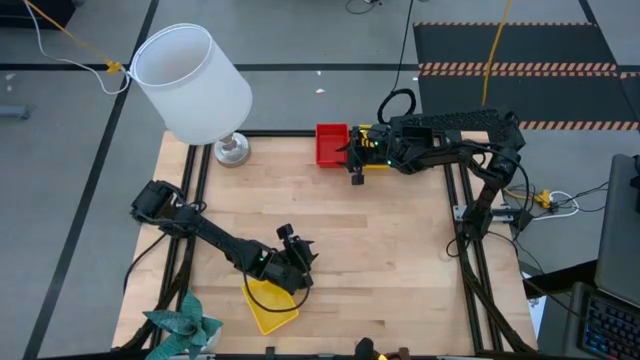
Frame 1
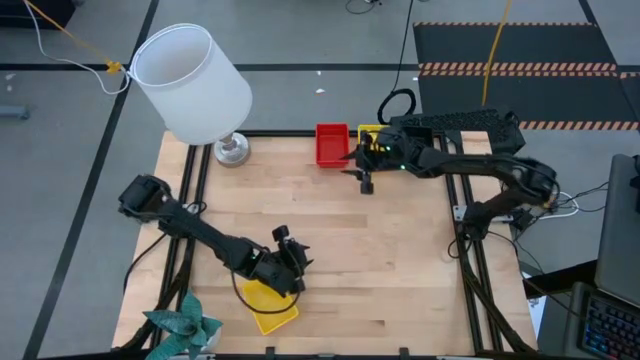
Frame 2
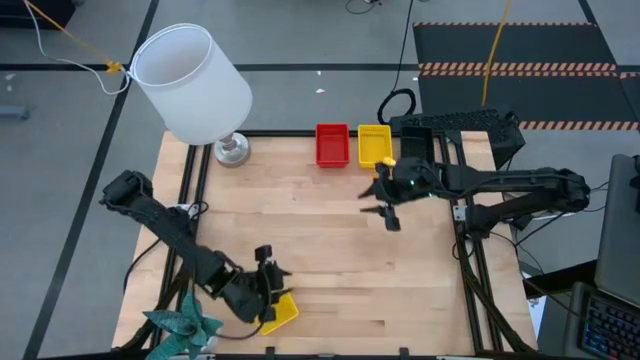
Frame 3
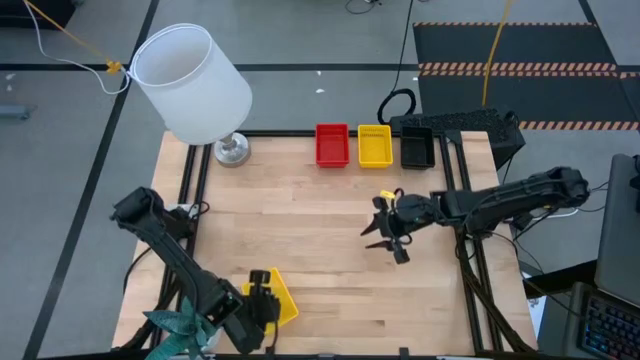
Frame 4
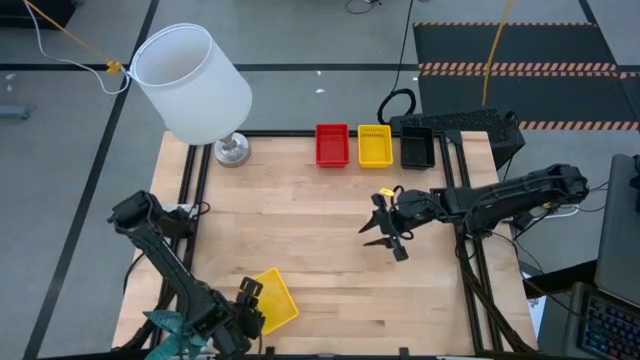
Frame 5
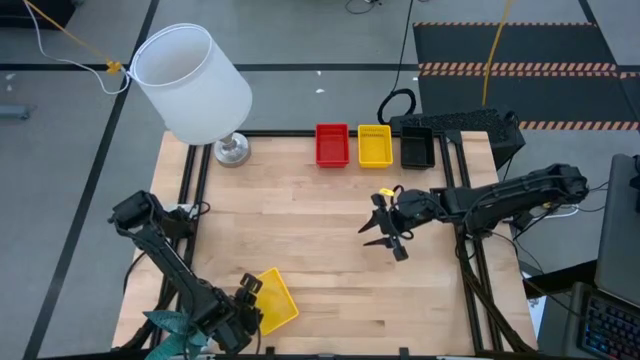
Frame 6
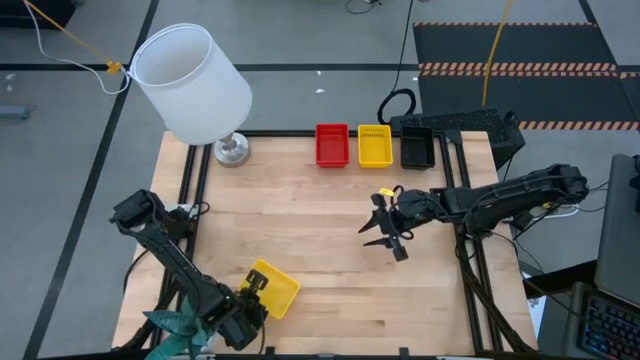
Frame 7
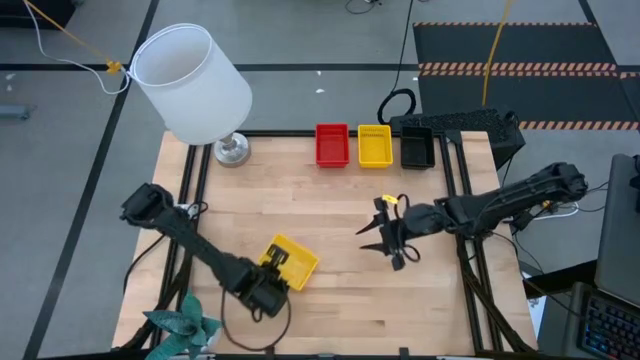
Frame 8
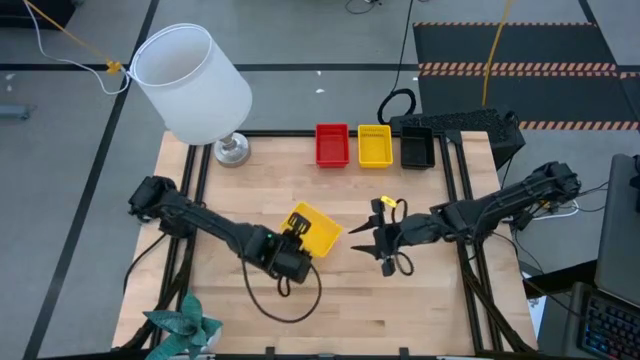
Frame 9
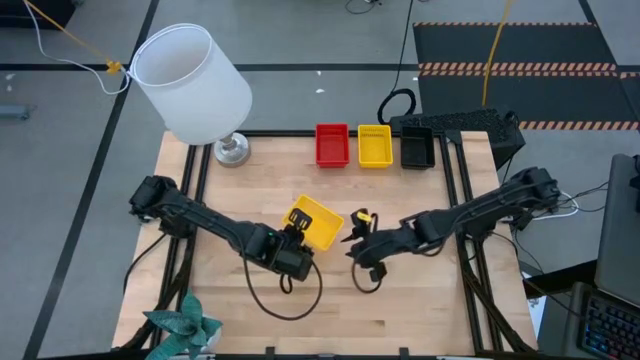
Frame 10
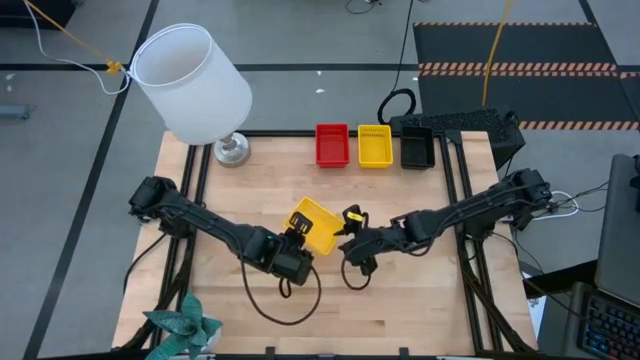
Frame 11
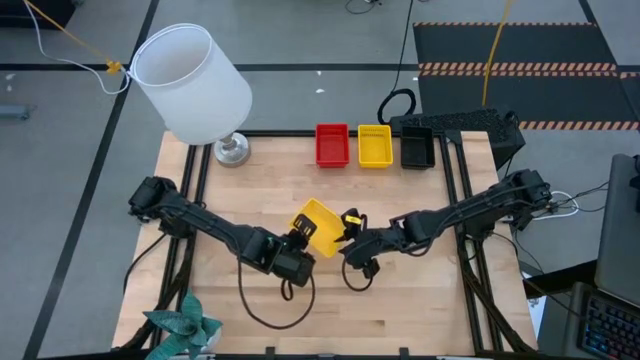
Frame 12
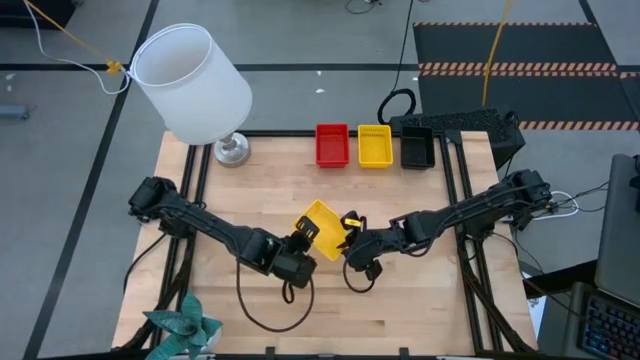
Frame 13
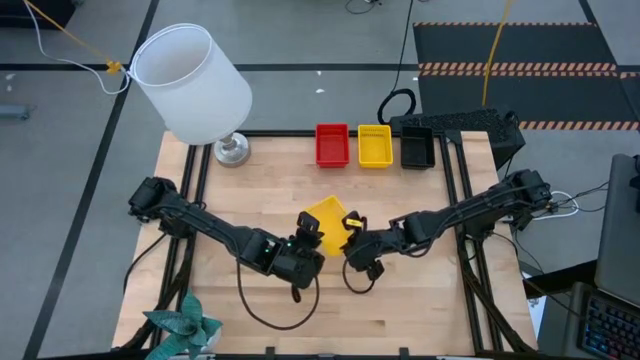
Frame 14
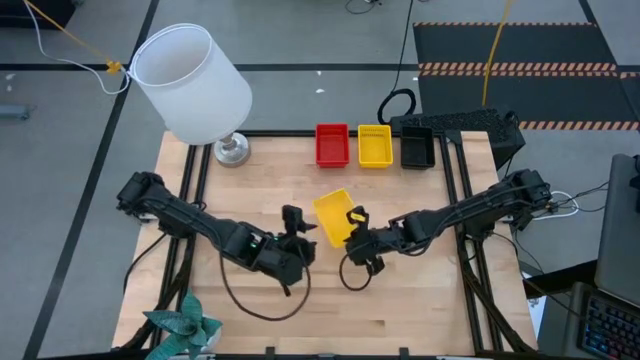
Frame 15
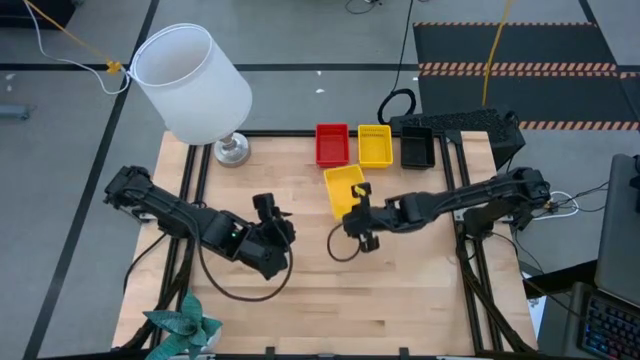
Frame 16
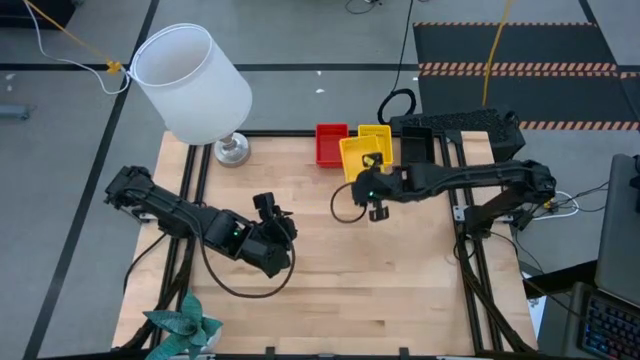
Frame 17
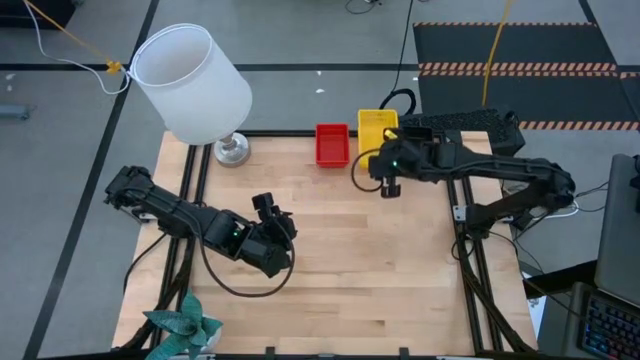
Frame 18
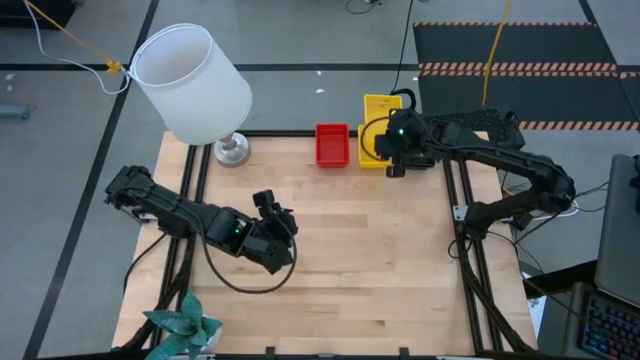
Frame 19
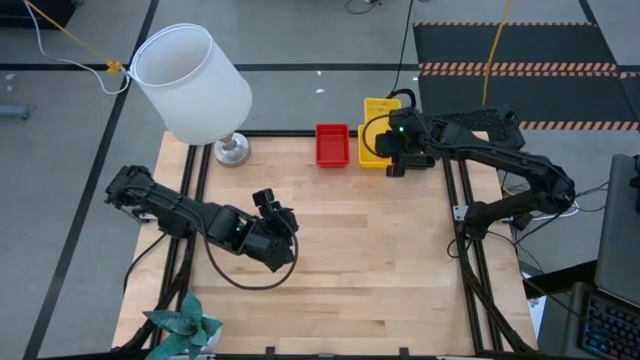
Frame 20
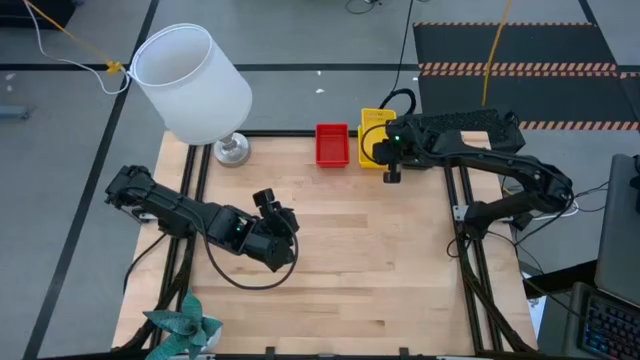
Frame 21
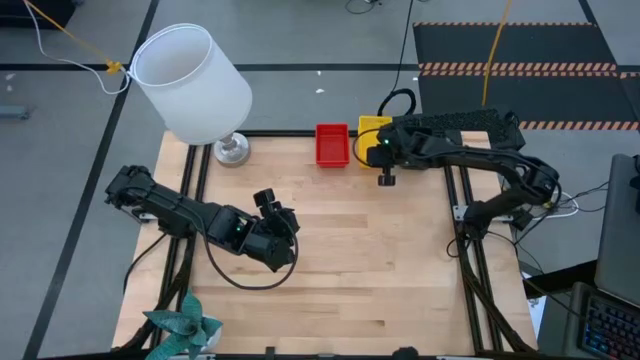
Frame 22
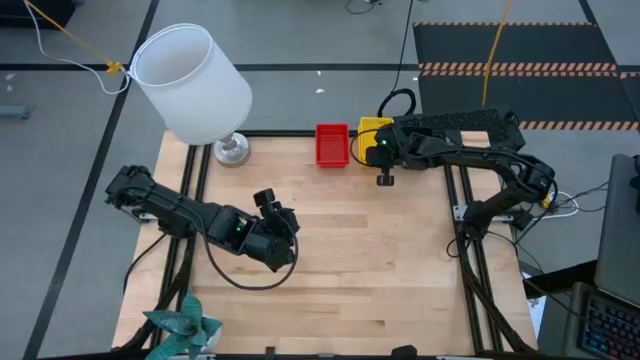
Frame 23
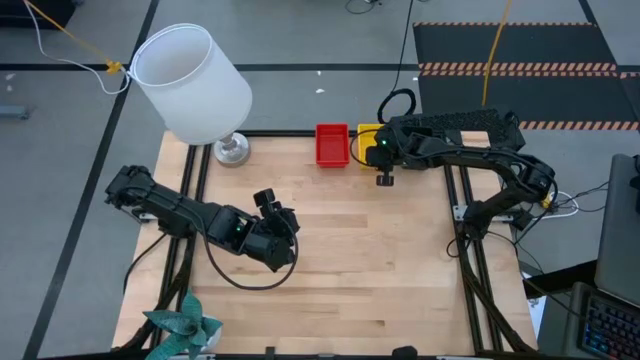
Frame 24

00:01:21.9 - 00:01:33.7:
Stack the bottom yellow bin on top of the yellow bin

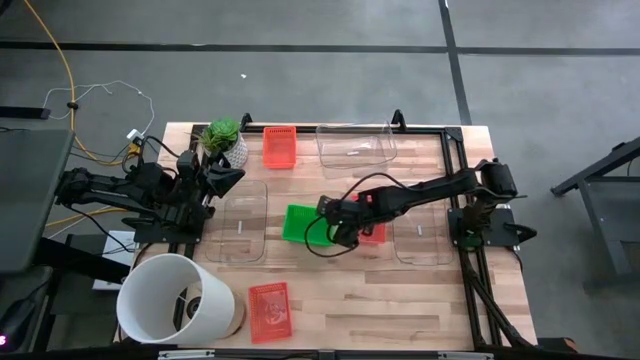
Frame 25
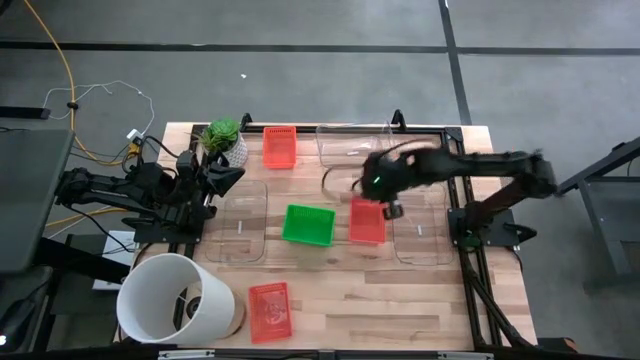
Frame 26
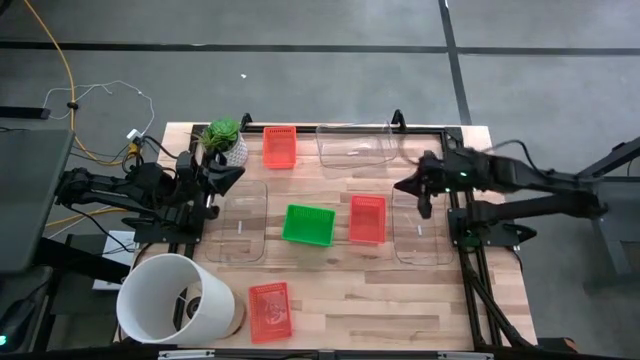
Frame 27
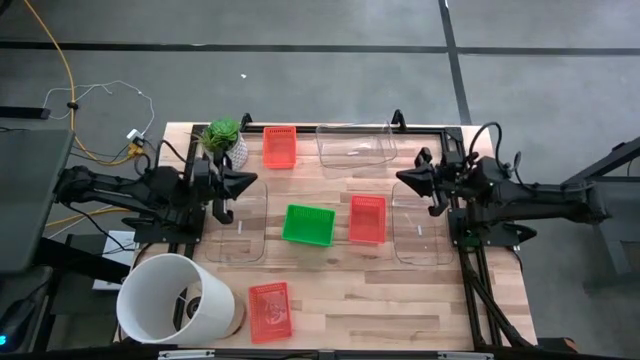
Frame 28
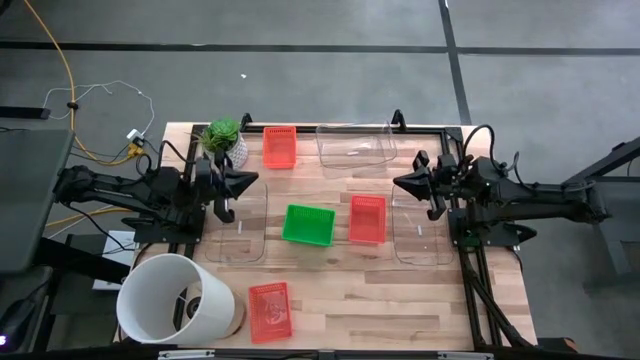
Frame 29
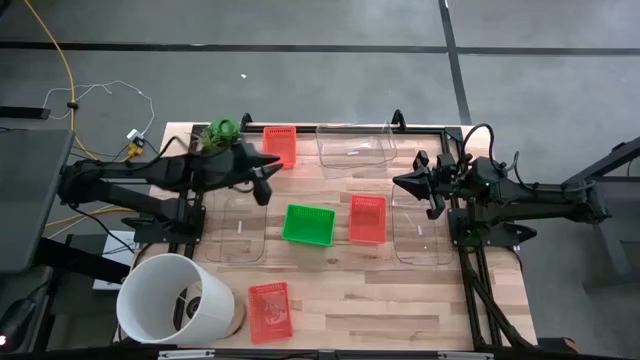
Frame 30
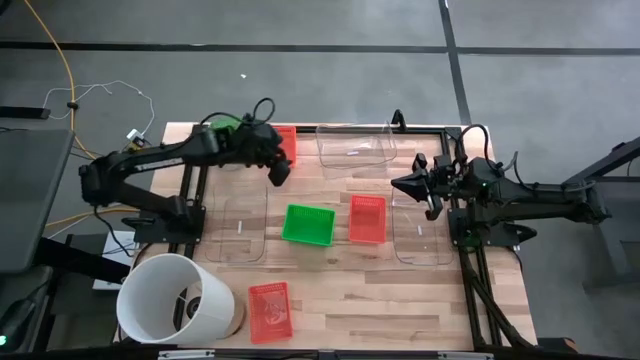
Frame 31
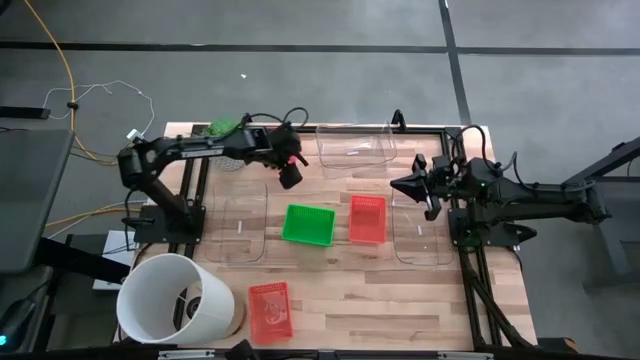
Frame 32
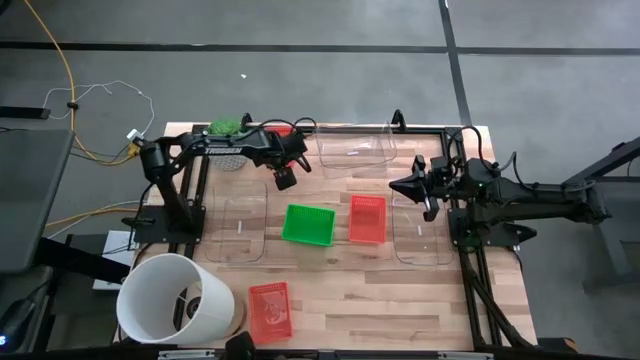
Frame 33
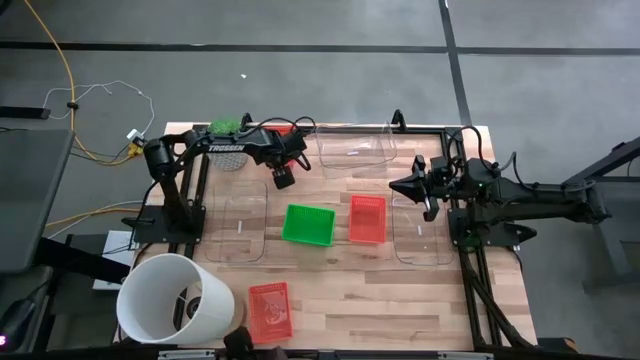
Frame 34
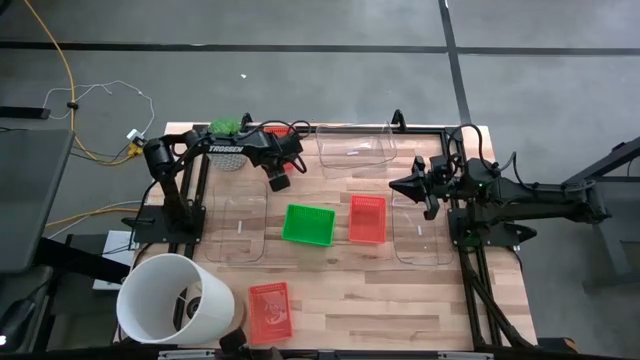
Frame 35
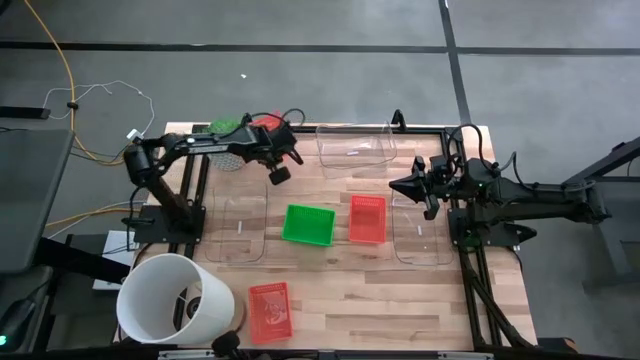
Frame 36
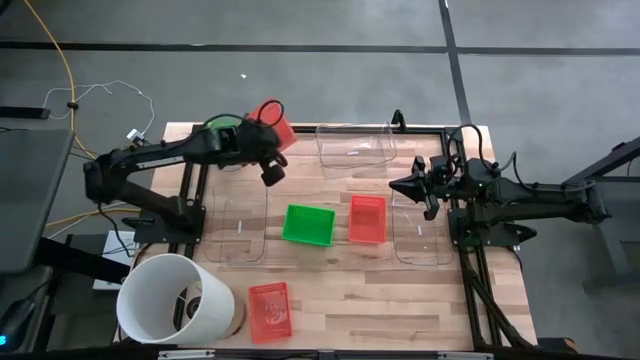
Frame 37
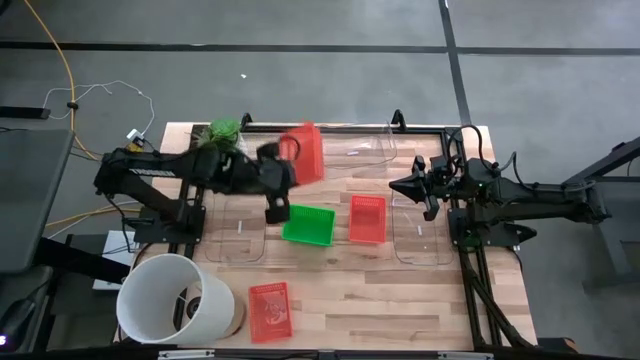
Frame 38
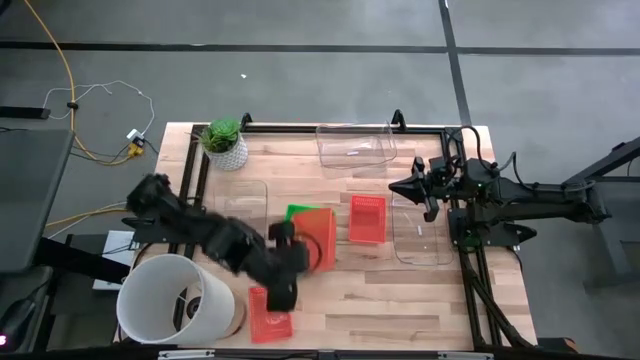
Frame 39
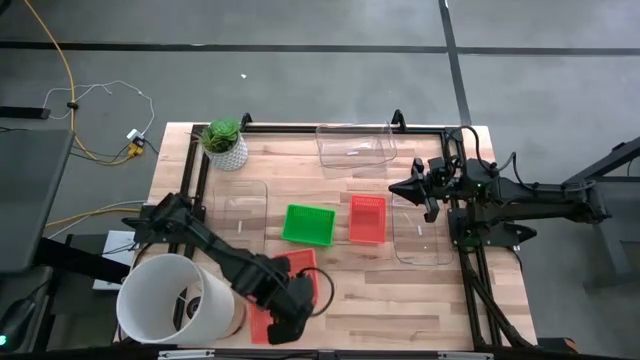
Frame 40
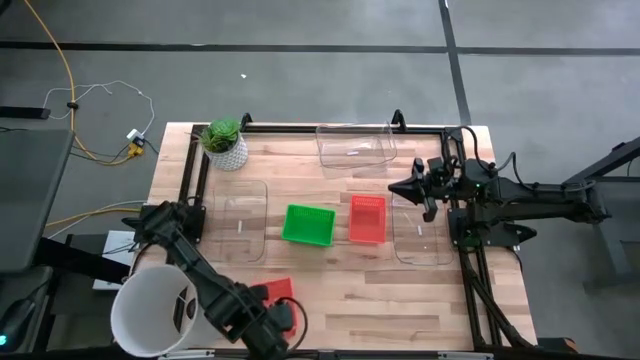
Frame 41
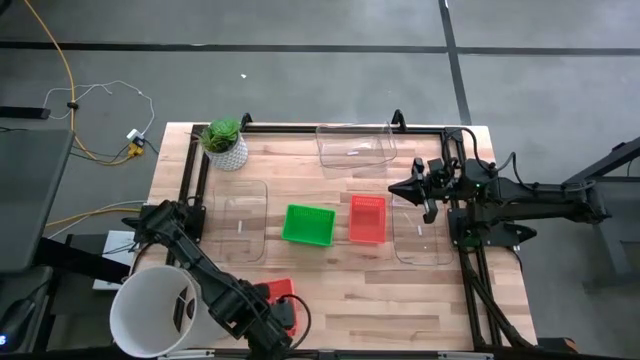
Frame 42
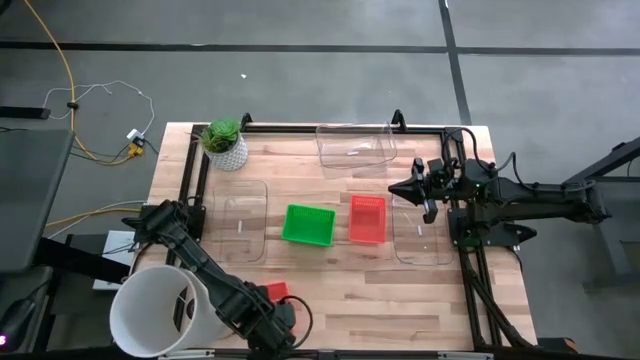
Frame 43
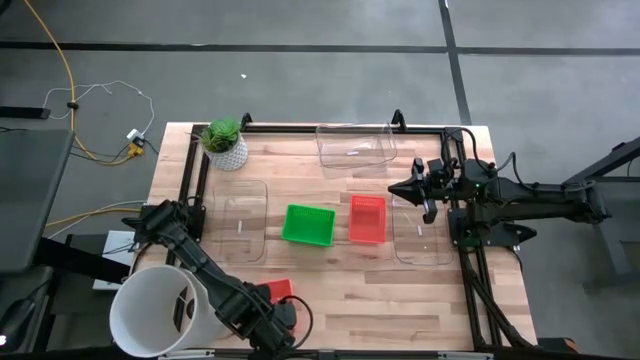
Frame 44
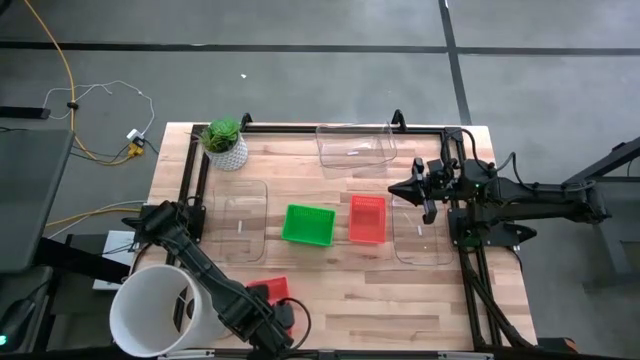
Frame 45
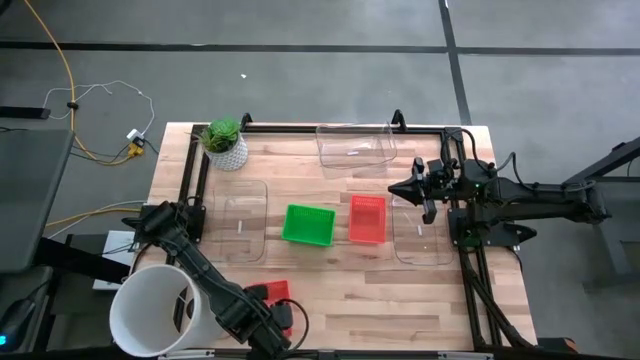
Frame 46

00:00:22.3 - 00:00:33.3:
Stack the top orange bin on the bottom orange bin
